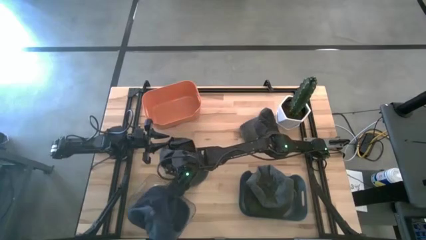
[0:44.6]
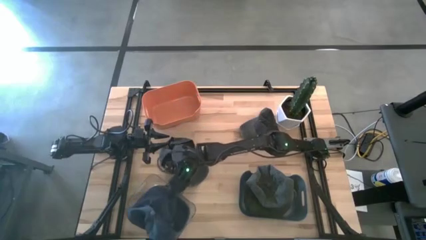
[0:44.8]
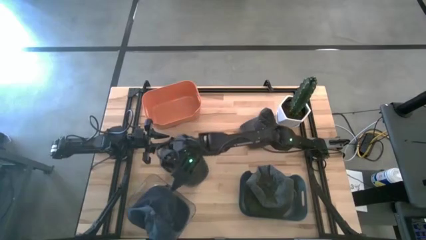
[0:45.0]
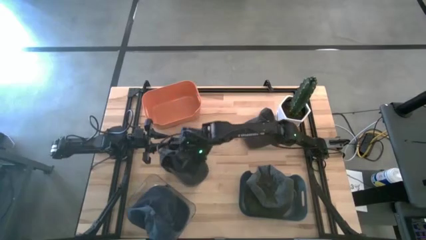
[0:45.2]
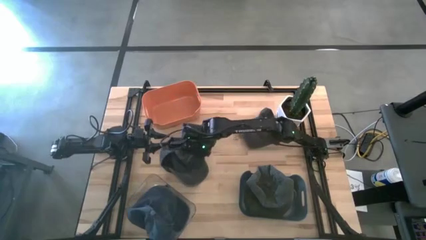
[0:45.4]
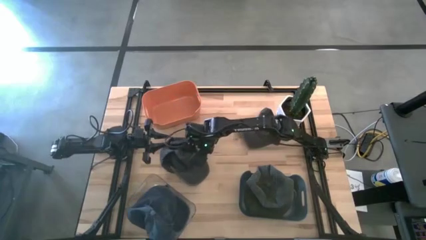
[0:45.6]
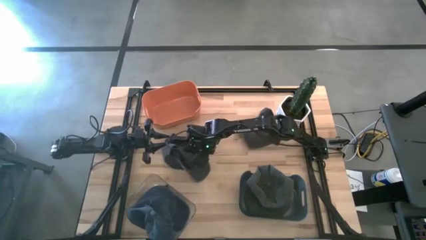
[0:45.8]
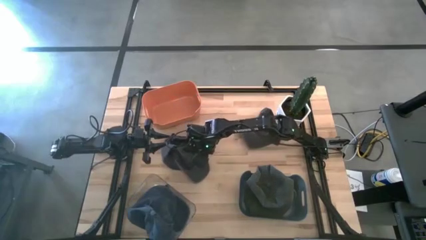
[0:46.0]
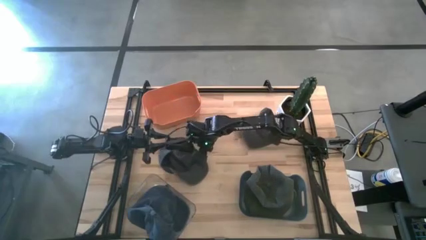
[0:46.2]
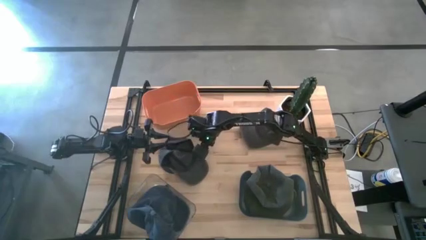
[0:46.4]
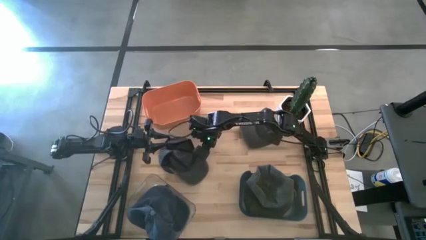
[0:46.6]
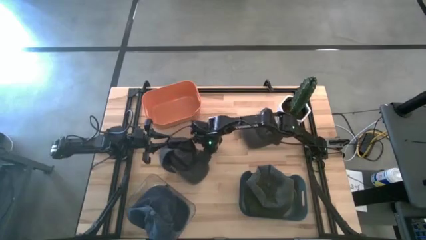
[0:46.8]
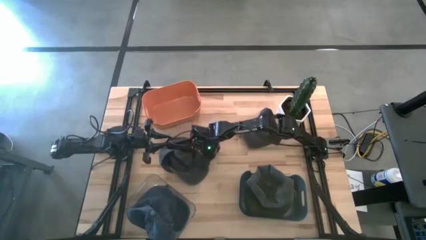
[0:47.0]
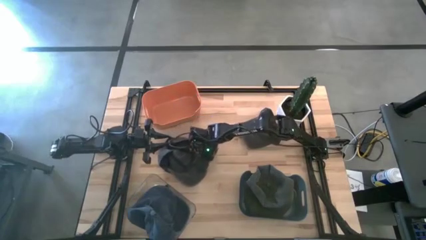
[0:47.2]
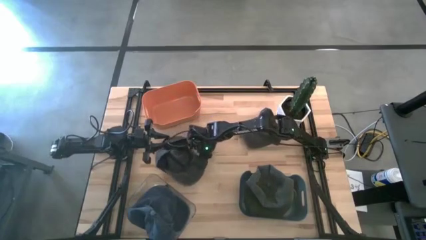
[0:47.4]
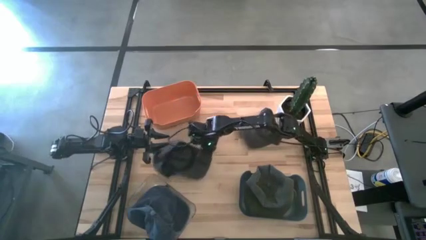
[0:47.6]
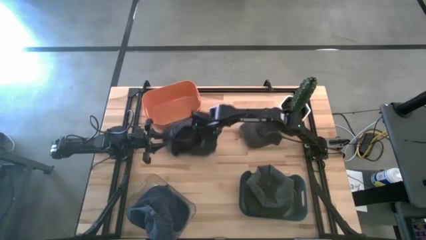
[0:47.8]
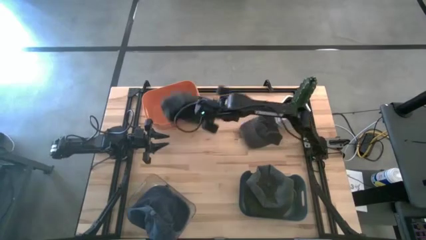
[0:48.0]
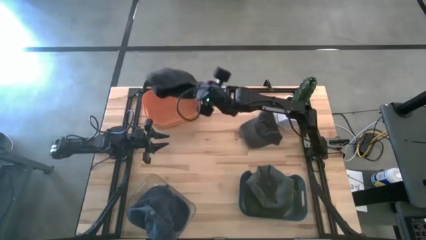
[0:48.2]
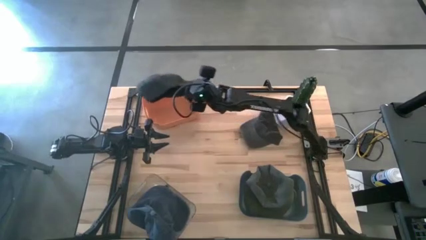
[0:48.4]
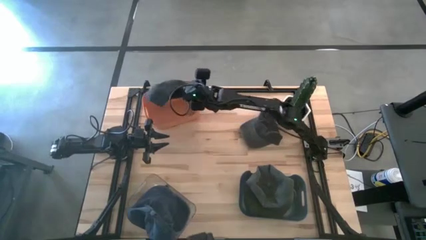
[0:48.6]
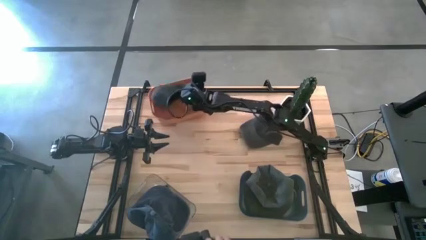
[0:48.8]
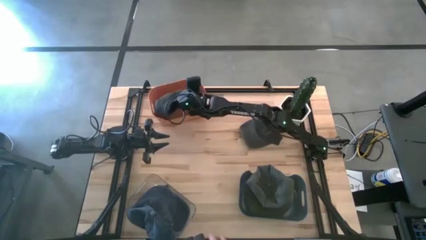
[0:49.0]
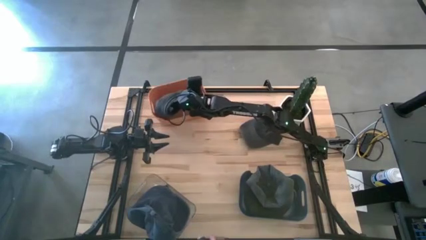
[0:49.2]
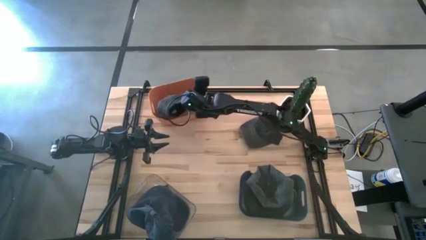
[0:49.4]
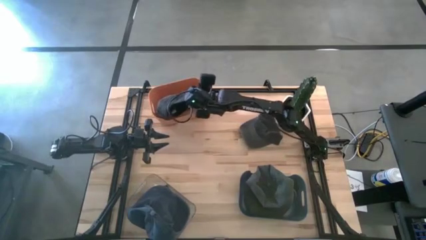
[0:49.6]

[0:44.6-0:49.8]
Task: Pick & Place hat
Put the left black cap into the orange bin

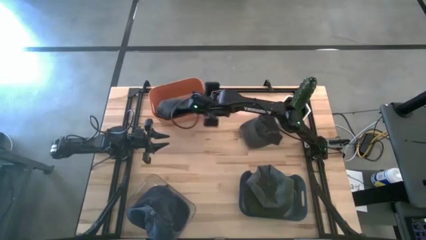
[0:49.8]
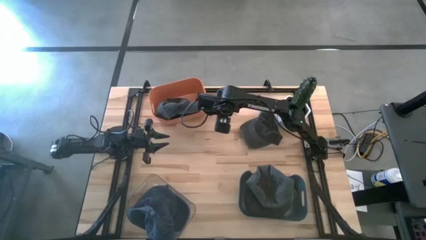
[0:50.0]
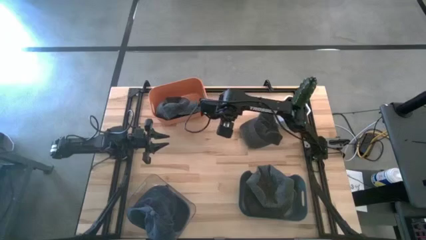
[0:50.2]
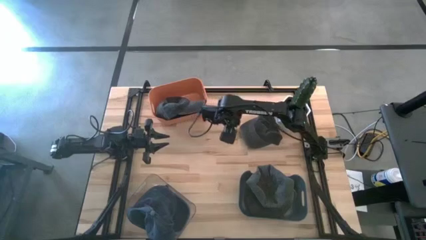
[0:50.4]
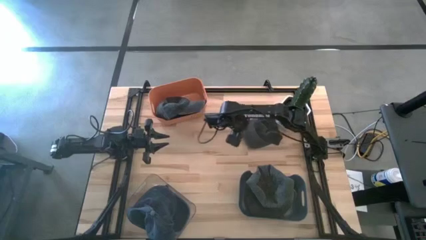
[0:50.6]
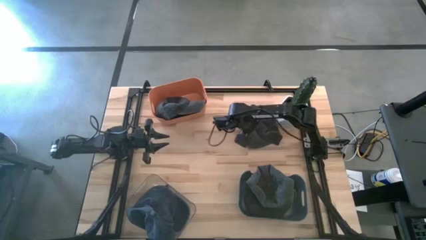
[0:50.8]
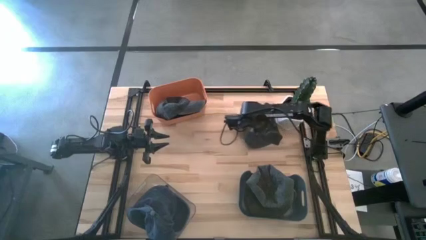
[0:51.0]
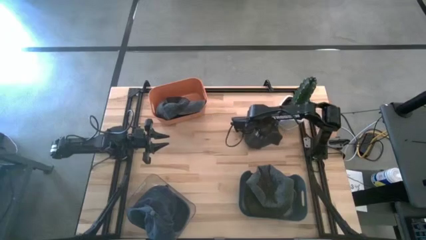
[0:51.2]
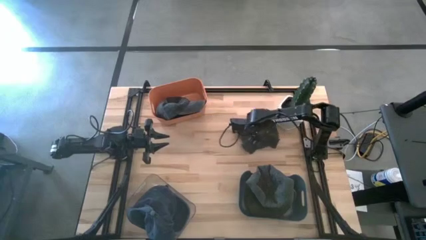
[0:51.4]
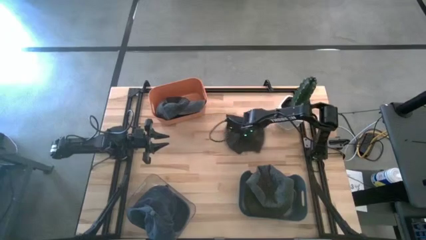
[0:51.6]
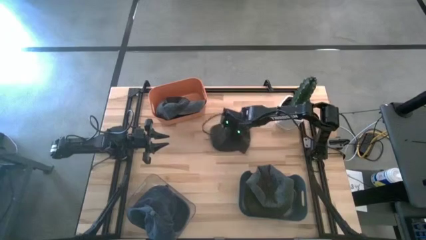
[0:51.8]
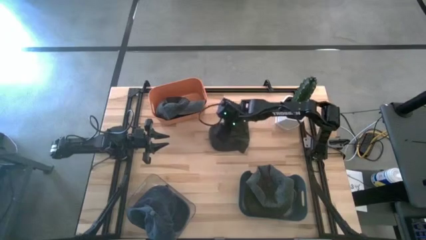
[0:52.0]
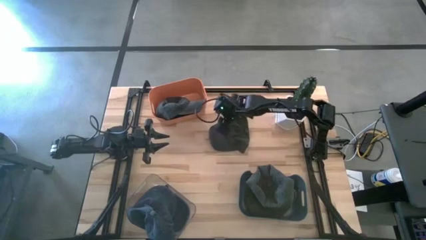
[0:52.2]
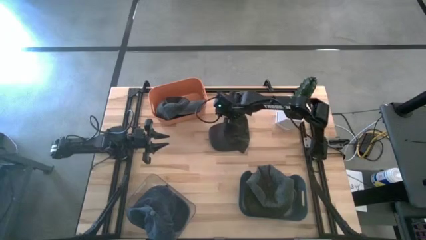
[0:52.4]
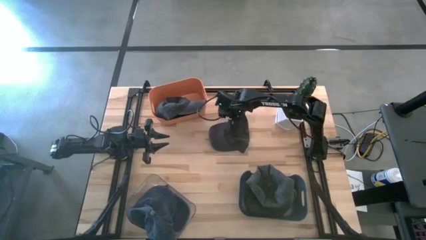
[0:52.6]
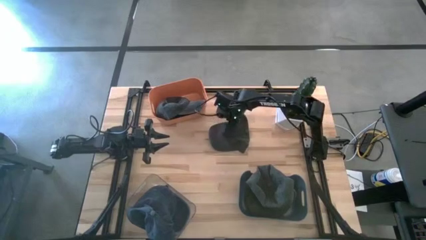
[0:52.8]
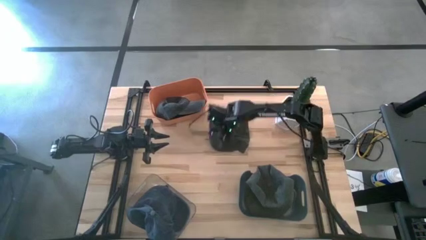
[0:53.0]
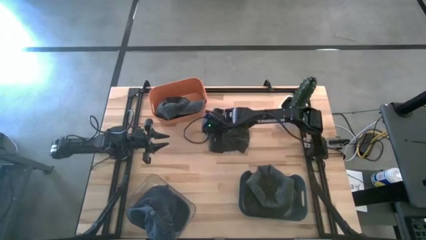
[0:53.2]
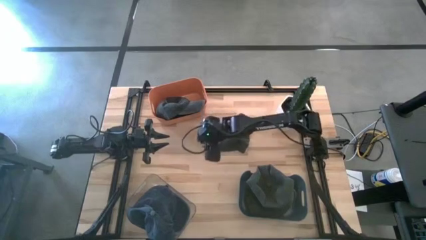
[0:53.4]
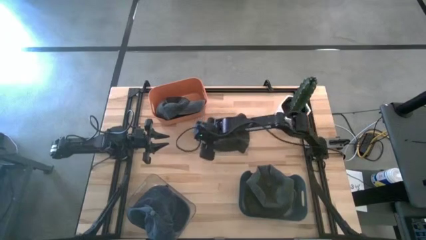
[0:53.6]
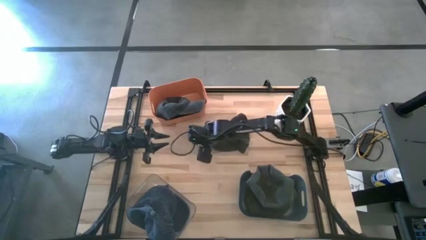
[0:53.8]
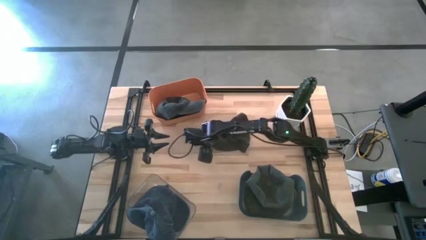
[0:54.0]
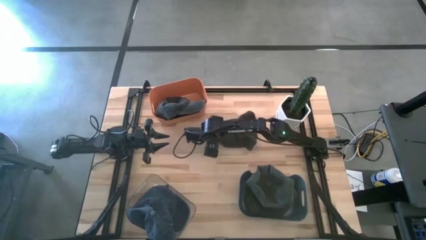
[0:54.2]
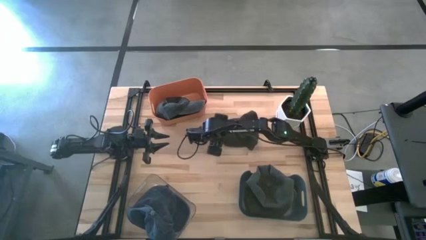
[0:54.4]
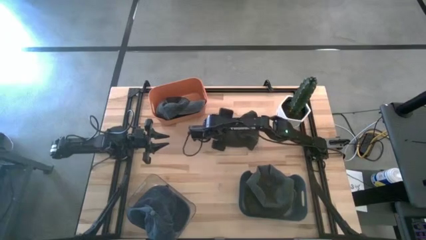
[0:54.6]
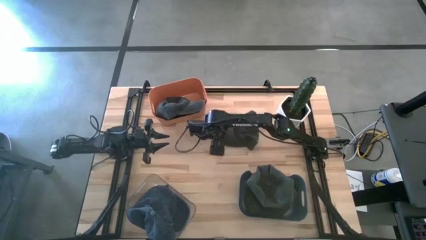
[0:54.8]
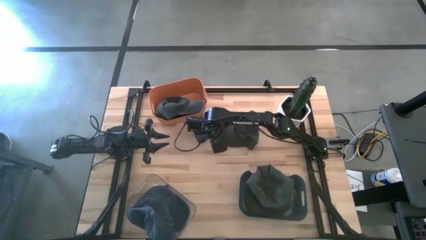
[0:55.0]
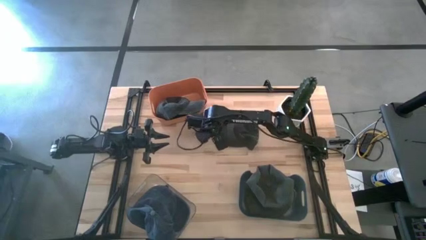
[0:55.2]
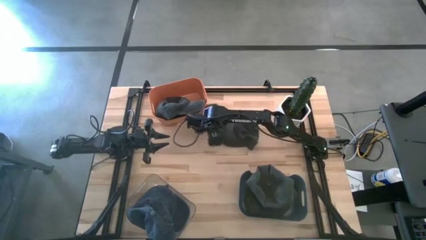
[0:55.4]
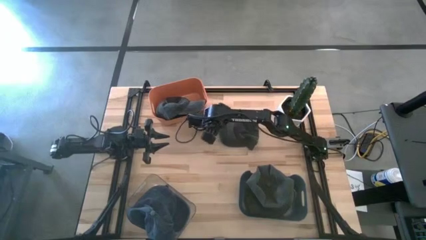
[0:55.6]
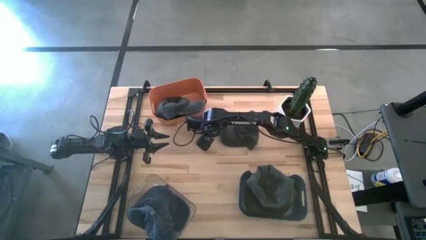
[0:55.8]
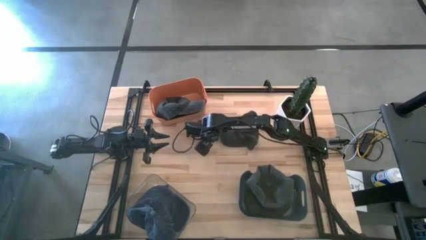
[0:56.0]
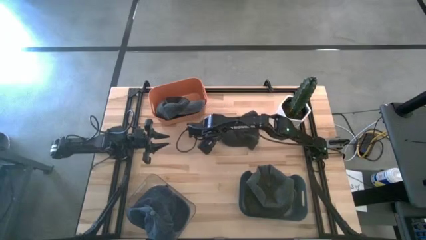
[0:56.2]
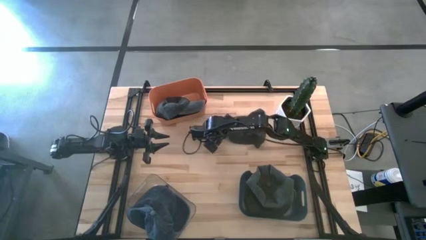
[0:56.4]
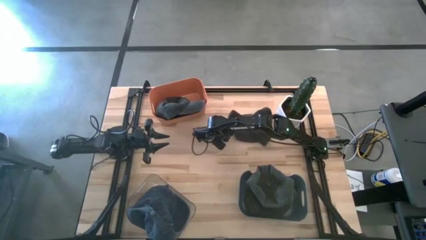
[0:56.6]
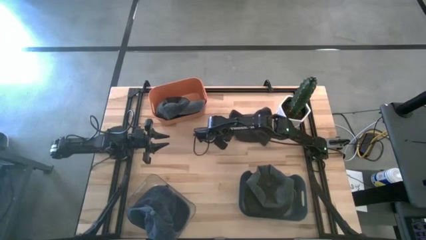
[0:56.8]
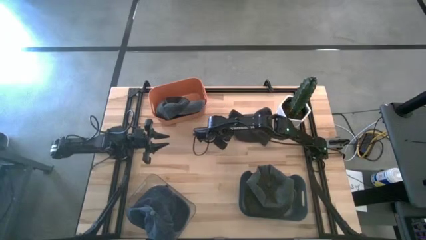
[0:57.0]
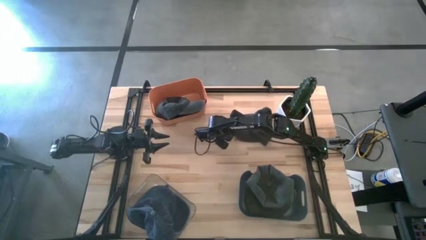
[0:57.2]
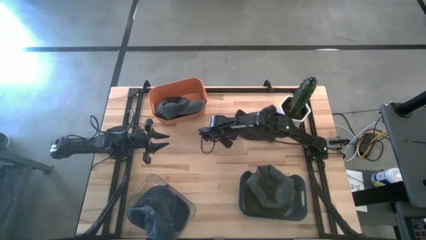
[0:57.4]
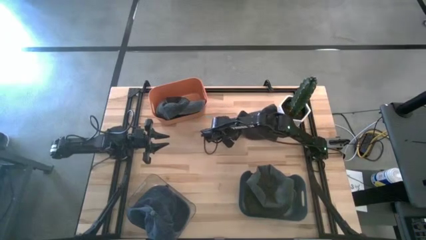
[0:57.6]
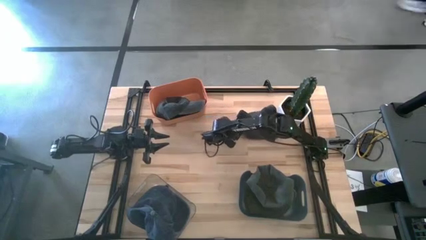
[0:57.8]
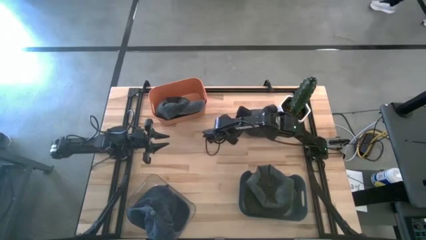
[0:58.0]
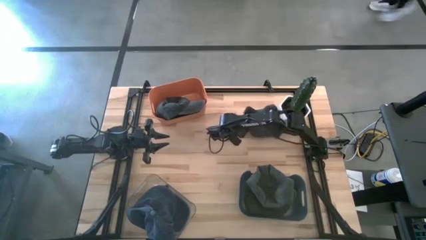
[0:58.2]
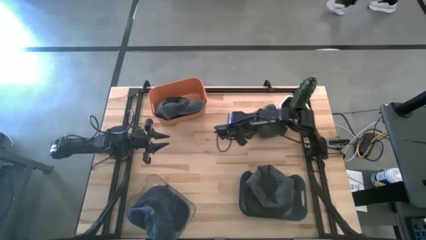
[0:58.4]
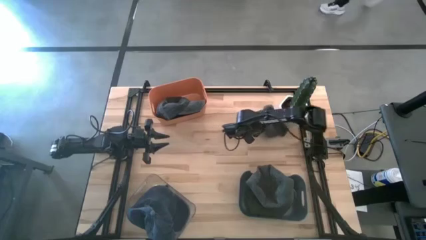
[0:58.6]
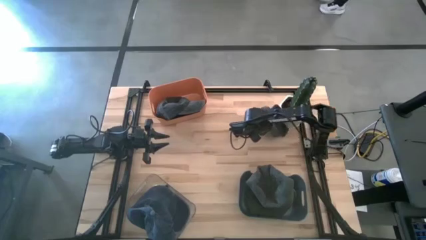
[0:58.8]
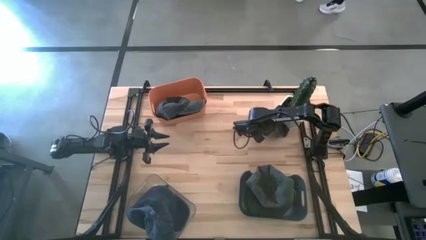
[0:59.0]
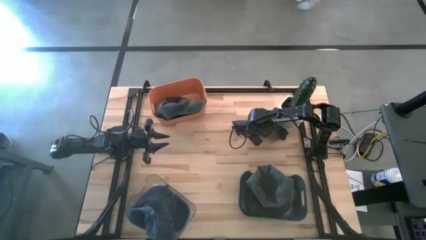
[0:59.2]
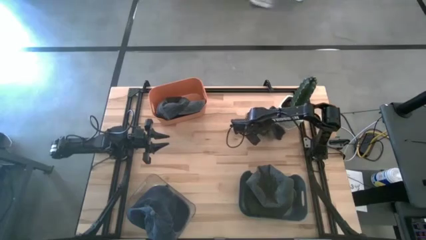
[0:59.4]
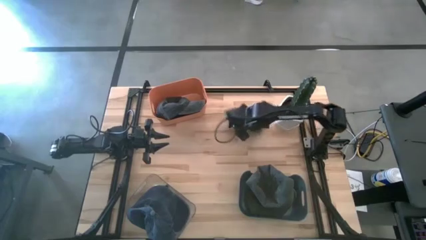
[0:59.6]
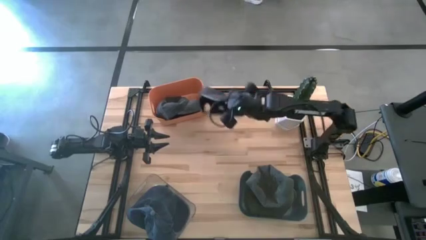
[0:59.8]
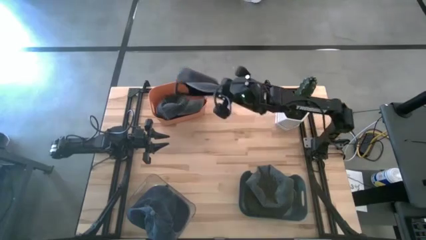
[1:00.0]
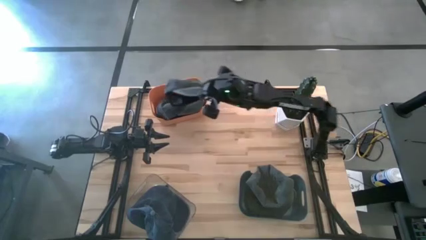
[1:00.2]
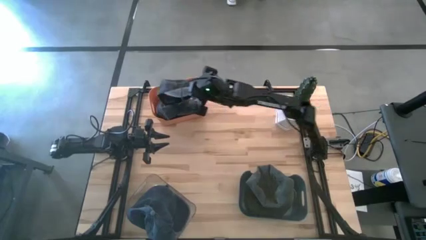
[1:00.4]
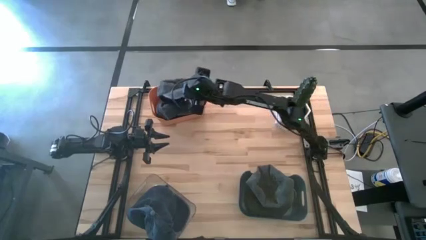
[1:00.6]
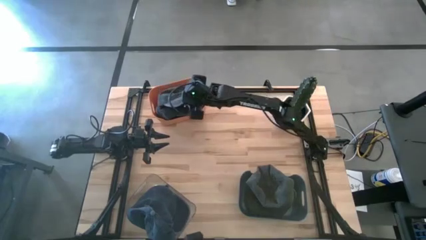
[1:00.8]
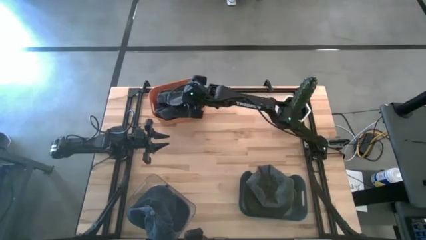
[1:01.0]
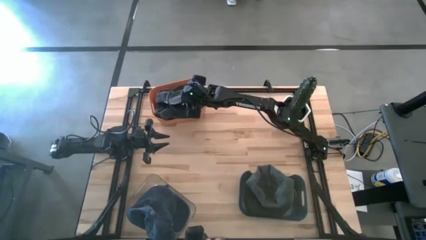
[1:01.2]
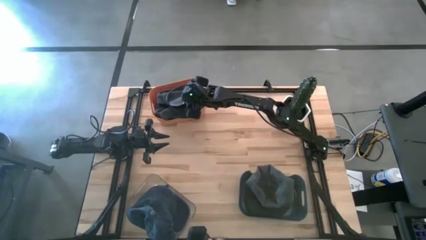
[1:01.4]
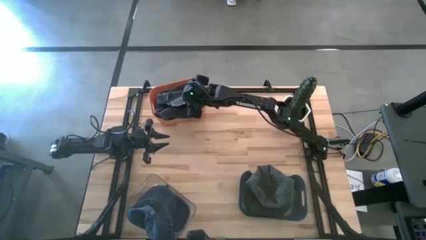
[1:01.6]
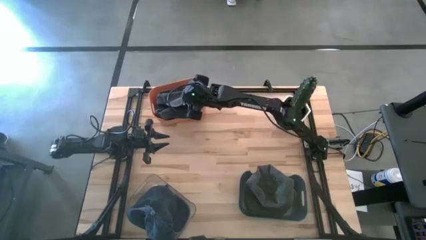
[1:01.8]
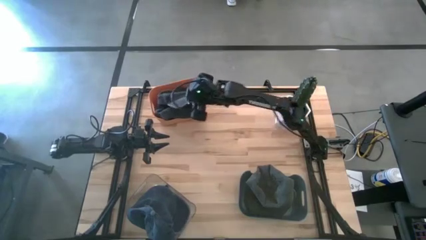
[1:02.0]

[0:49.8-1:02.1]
Put the black cap into the orange bin
